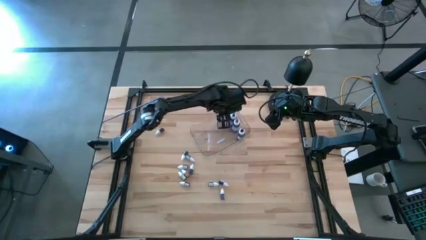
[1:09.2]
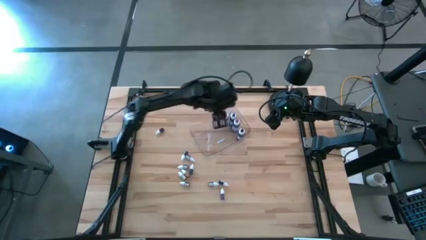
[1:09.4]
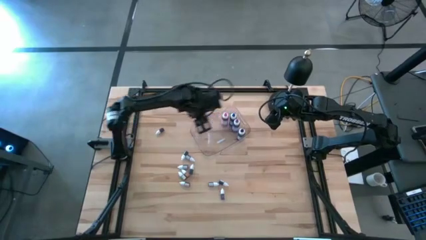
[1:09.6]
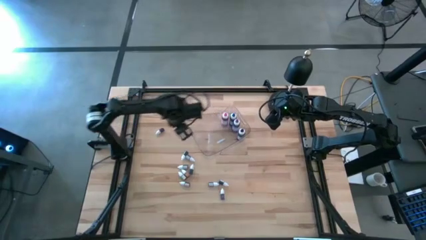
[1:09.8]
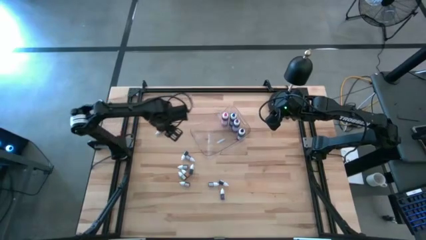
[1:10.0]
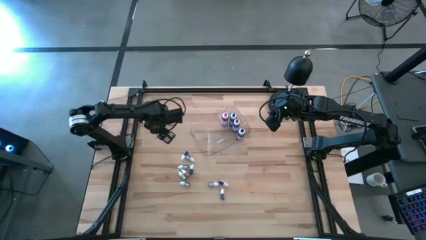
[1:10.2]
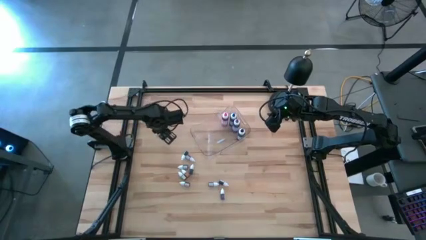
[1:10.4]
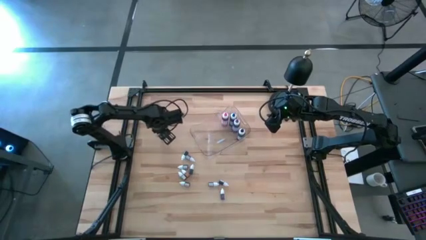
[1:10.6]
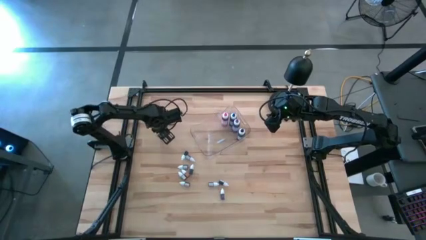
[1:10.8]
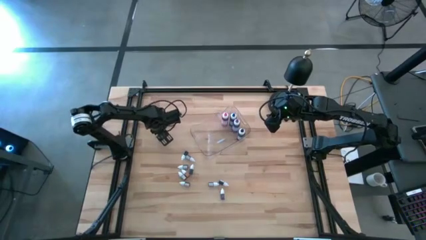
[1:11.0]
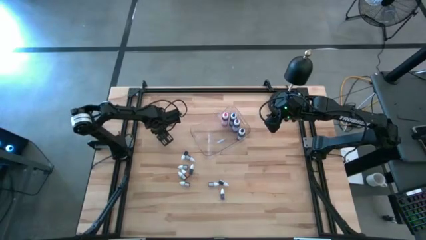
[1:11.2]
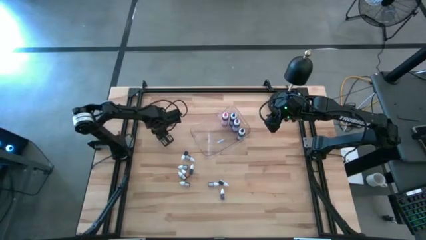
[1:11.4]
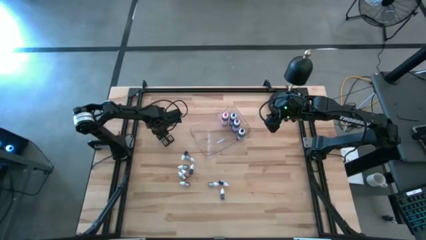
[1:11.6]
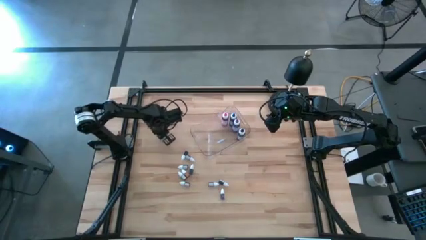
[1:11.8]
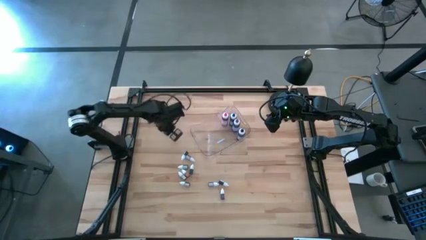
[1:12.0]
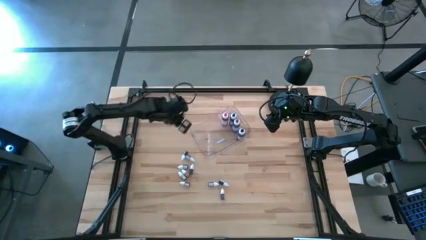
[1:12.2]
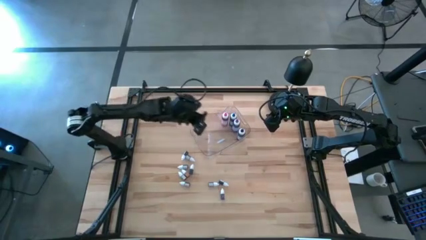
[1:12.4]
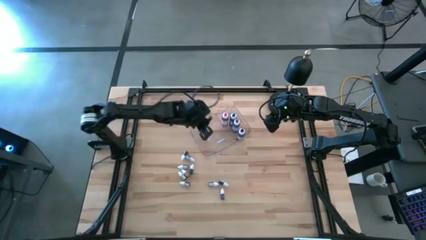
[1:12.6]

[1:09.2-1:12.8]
Task: Pick & Place food coloring
Put the top left small red food coloring bottle into the transparent bin

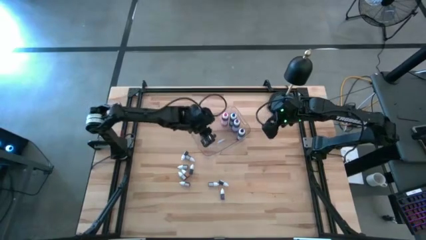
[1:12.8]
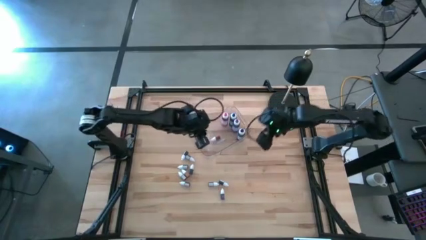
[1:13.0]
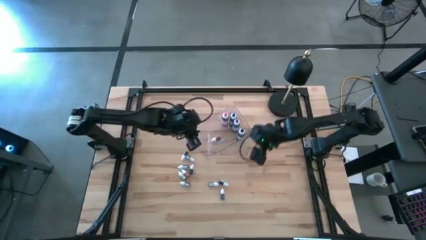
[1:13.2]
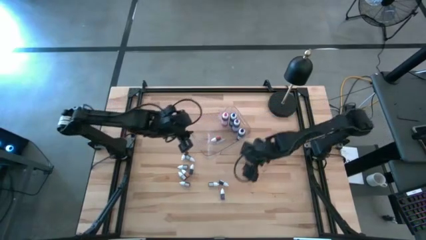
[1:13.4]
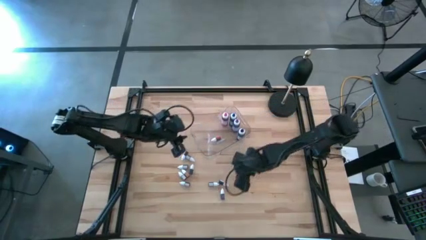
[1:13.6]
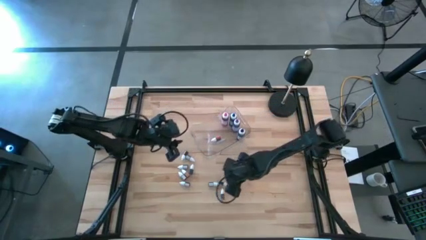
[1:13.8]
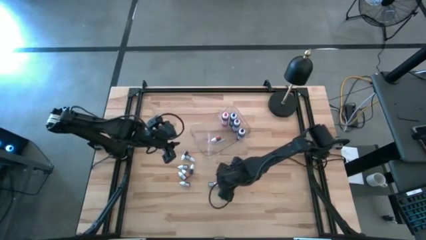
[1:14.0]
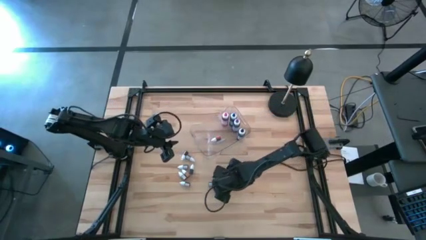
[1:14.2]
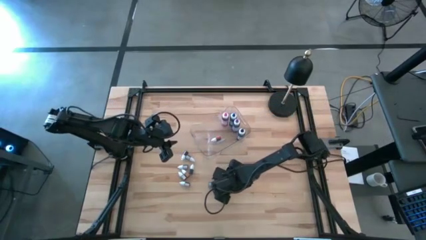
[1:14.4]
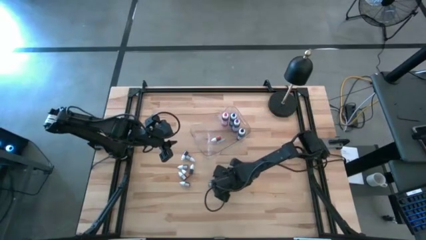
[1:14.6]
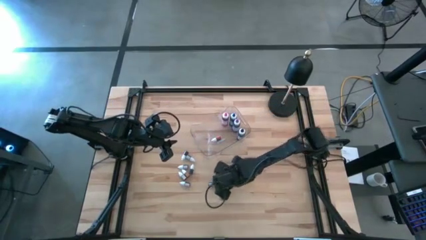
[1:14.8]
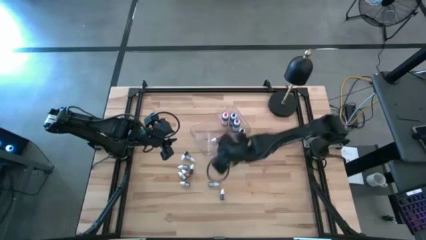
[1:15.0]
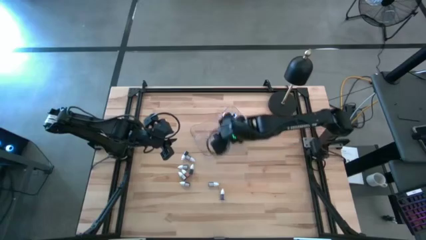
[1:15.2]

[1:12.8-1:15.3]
Put the top small purple food coloring bottle into the transparent bin

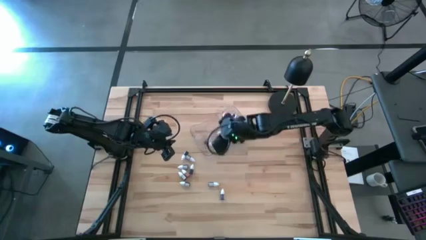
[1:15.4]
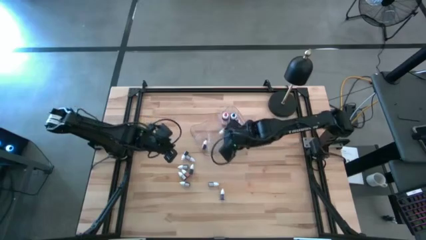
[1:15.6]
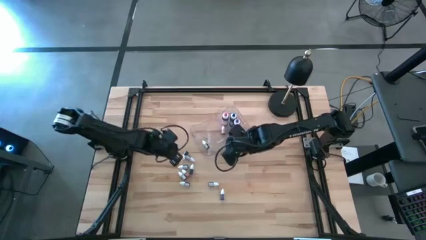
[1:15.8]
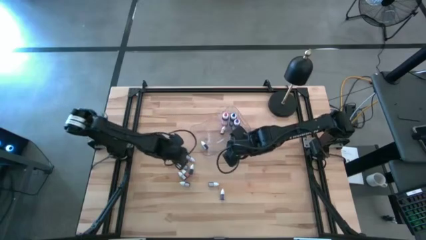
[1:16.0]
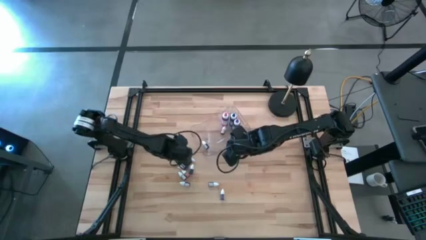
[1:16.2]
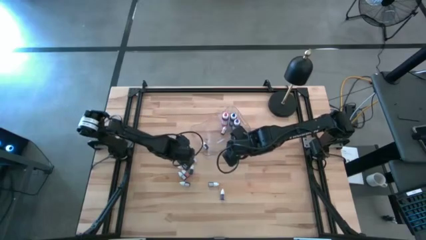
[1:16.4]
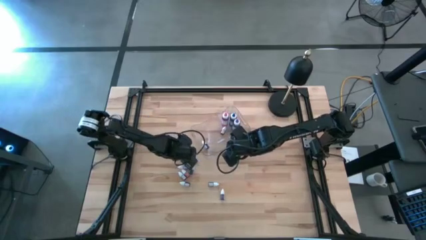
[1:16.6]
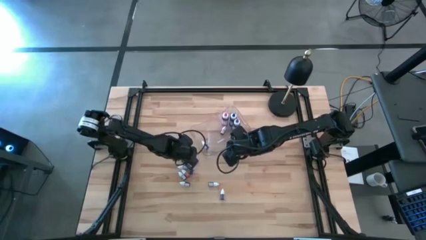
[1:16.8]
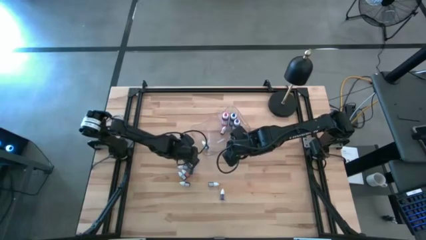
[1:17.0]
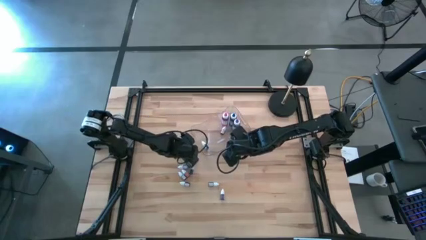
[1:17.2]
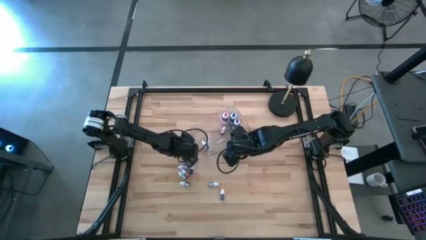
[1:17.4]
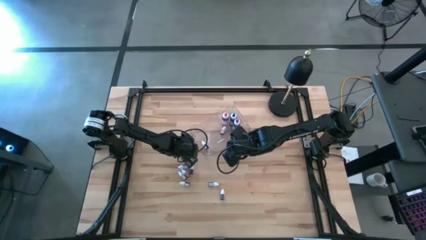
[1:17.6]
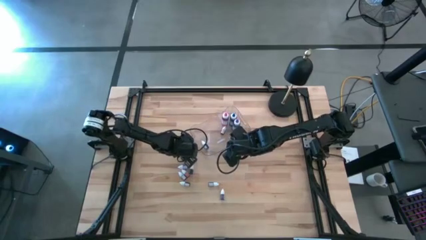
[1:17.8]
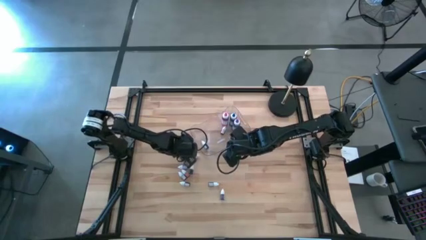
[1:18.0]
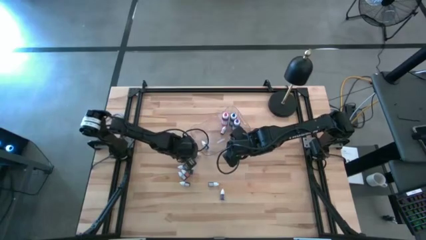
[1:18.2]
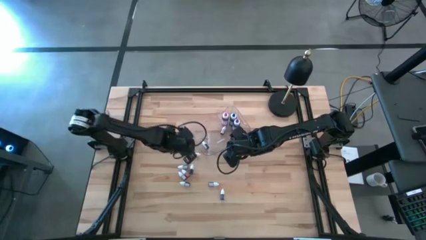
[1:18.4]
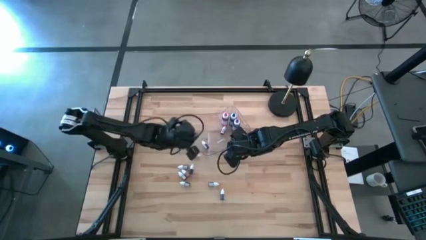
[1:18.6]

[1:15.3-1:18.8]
Put the small black food coloring bottle into the transparent bin

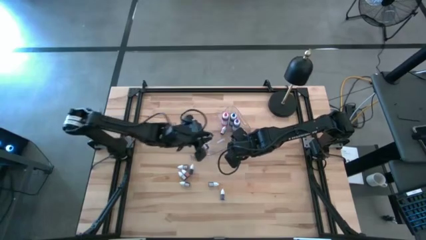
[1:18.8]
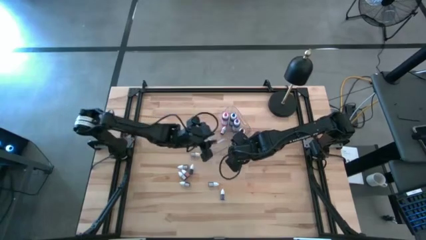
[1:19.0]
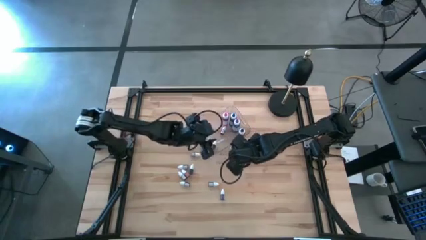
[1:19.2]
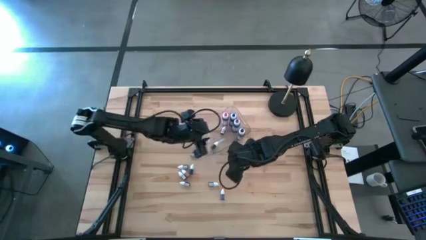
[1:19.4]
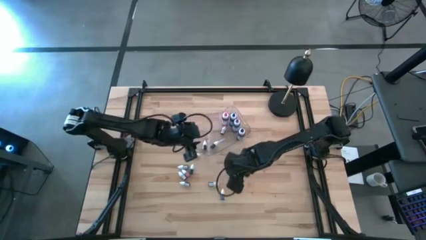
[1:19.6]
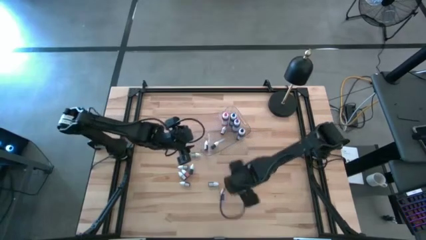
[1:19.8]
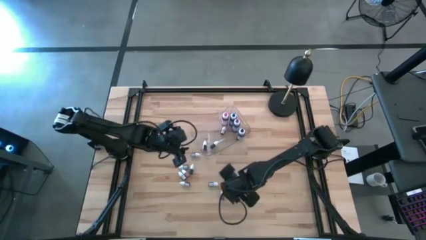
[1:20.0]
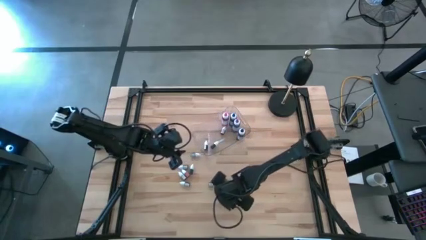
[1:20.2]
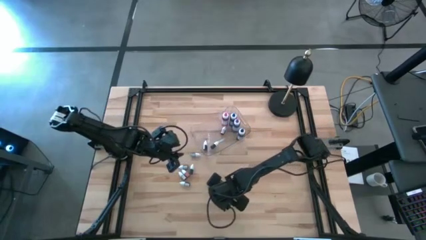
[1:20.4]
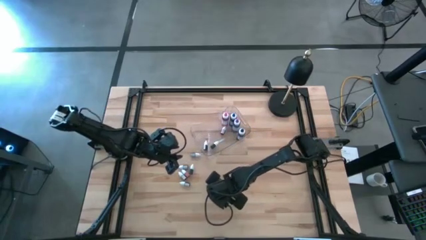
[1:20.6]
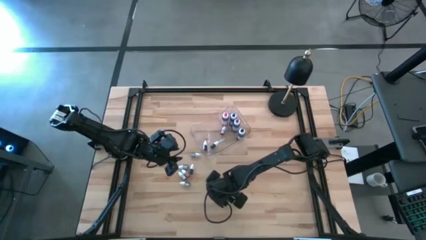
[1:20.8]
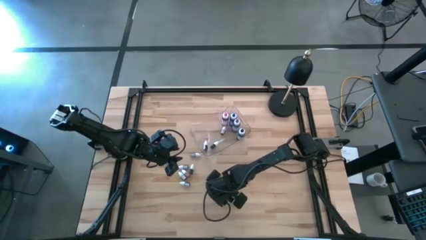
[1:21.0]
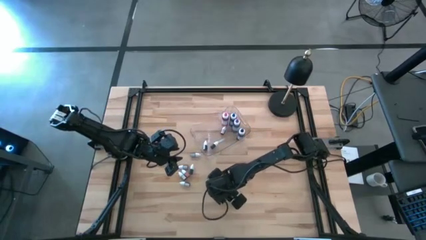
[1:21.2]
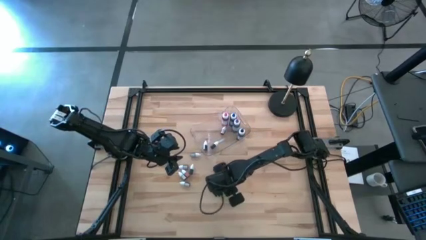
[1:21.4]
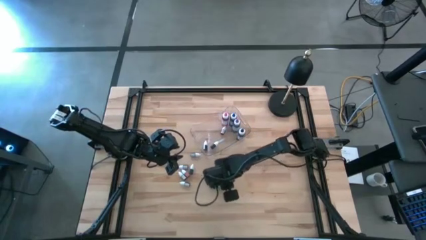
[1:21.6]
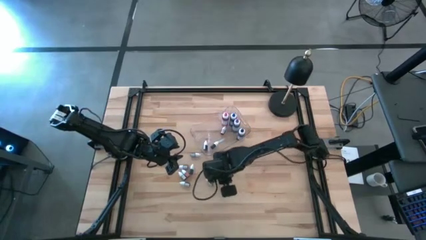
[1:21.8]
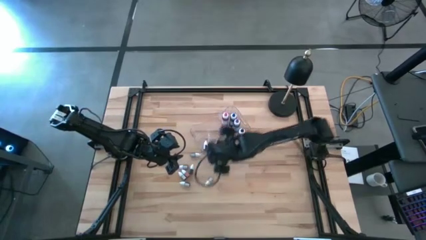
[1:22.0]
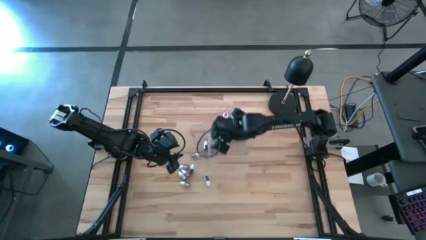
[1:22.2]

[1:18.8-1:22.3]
Put the small purple food coloring bottle into the transparent bin

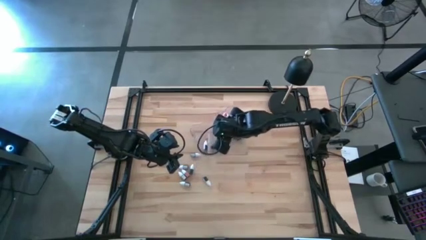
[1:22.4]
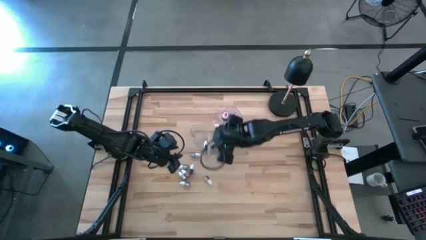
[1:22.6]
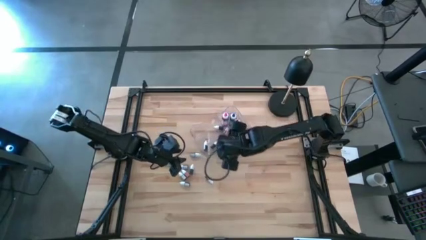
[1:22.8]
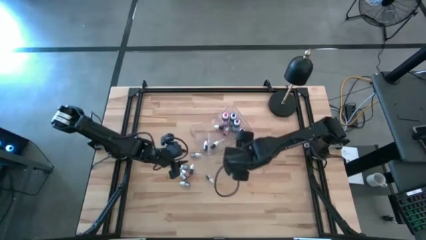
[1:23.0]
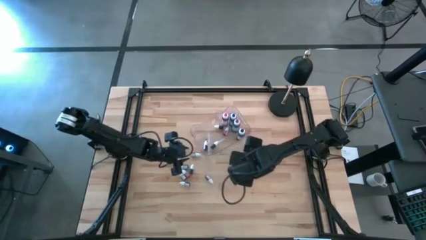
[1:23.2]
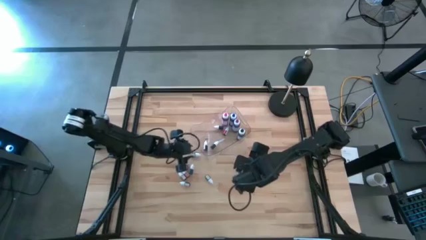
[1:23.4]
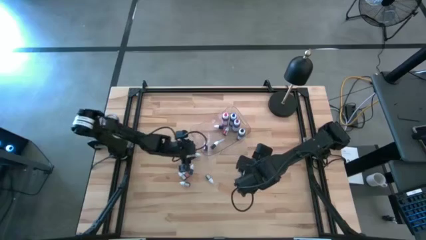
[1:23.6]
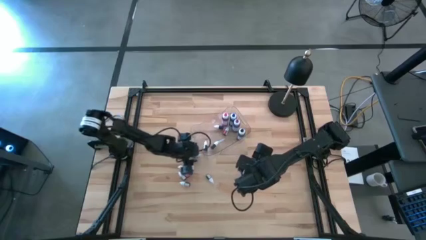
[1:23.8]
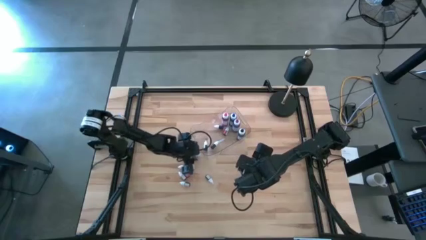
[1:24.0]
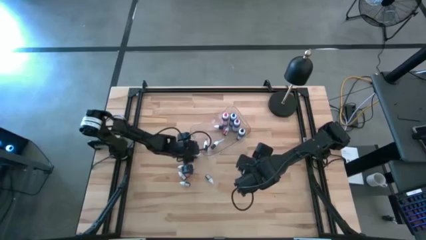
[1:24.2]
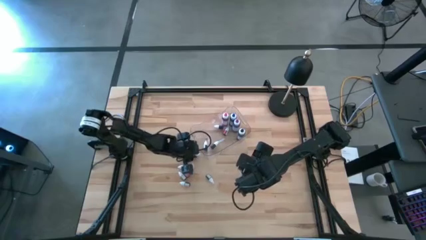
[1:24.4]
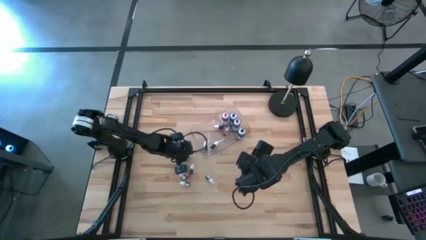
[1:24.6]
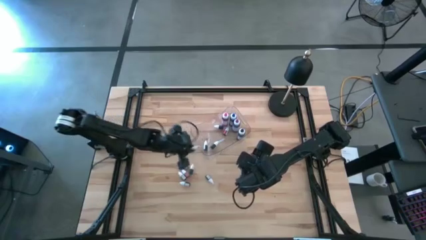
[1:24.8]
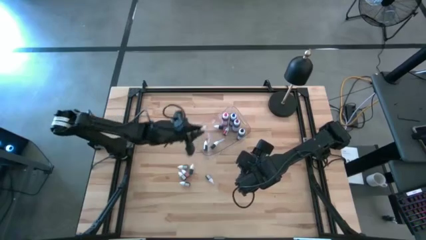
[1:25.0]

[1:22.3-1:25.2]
Put the small brown food coloring bottle into the transparent bin

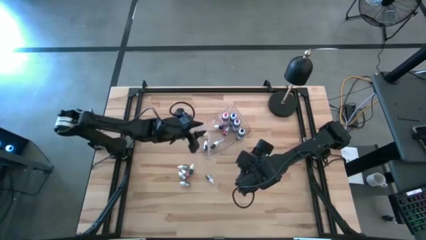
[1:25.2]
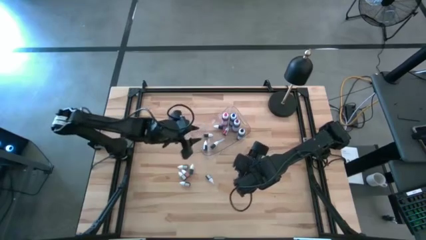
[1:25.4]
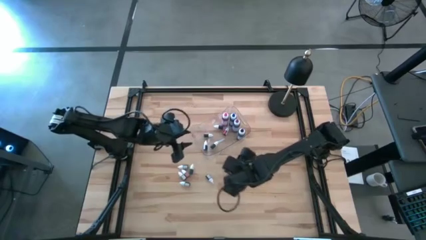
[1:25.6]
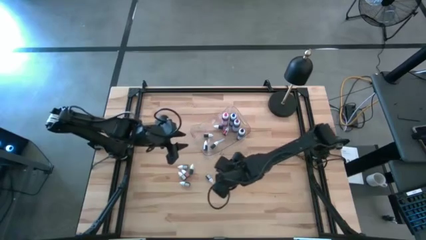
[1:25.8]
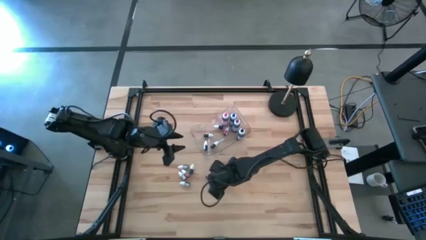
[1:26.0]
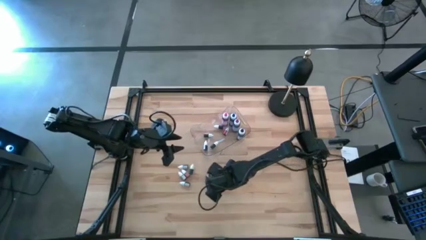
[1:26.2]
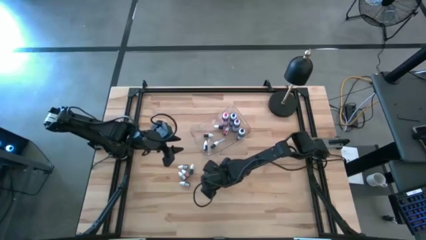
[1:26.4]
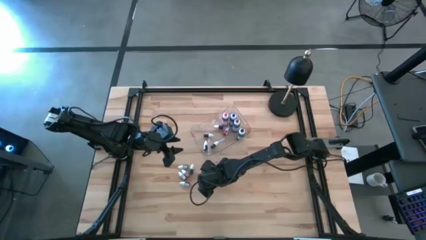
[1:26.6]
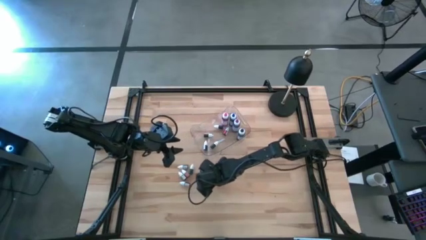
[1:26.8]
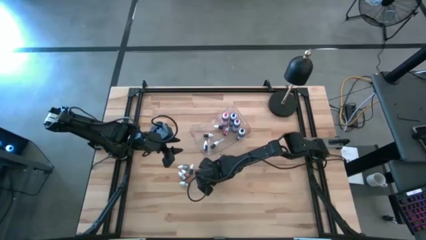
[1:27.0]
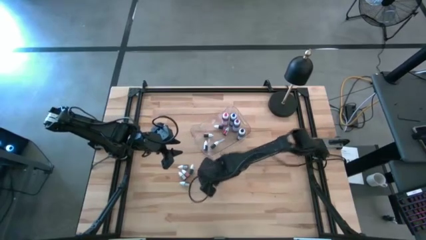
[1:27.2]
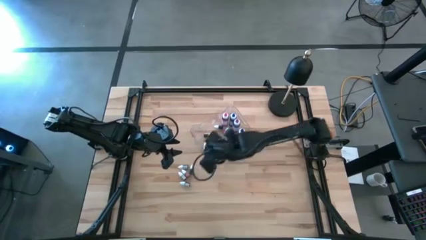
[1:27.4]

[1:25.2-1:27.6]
Put the small black food coloring bottle into the transparent bin
